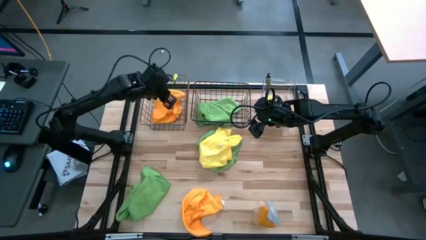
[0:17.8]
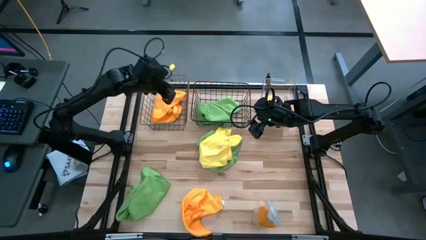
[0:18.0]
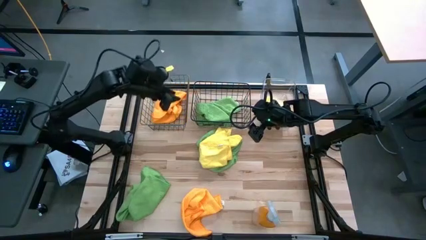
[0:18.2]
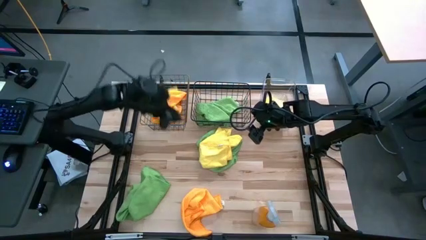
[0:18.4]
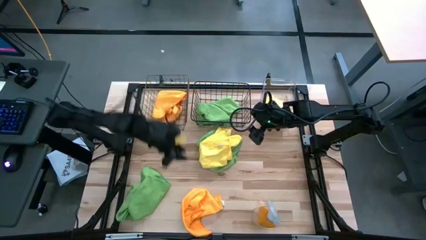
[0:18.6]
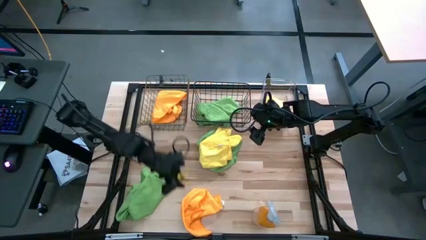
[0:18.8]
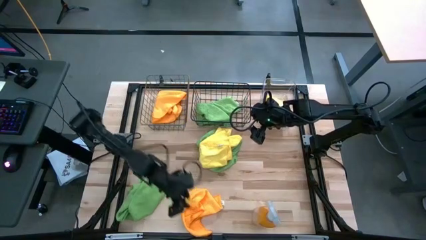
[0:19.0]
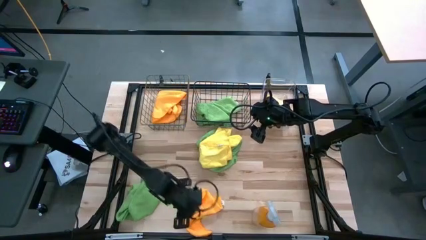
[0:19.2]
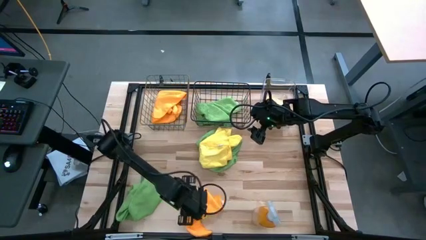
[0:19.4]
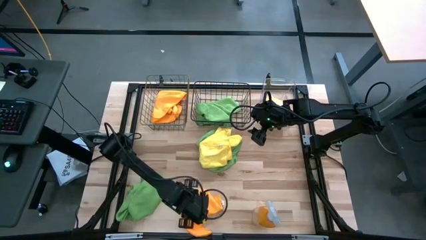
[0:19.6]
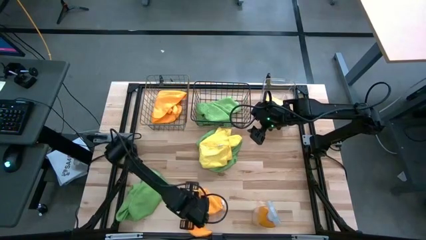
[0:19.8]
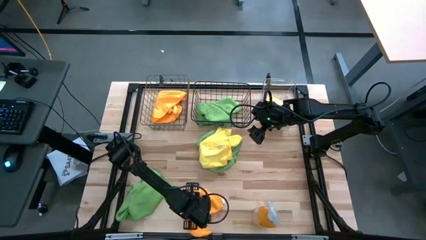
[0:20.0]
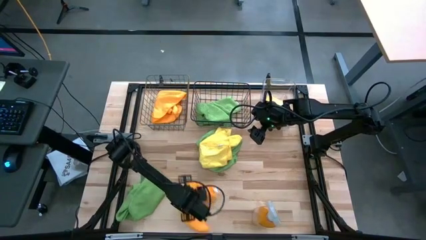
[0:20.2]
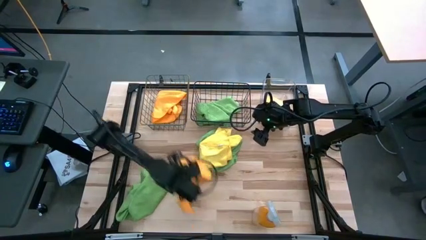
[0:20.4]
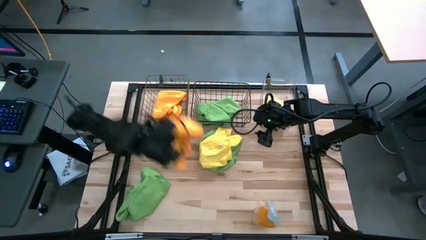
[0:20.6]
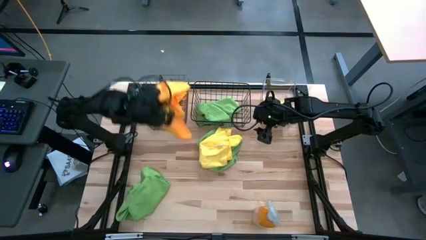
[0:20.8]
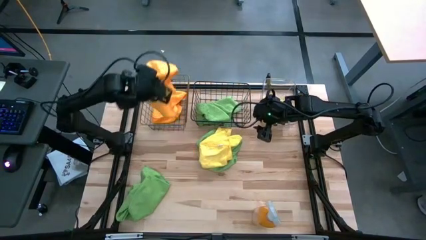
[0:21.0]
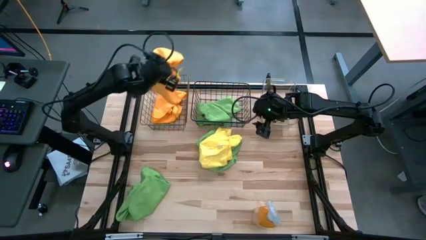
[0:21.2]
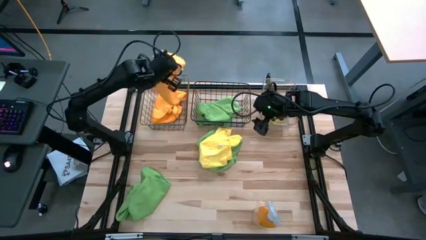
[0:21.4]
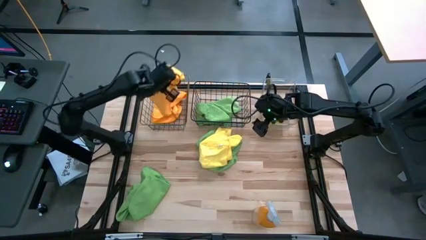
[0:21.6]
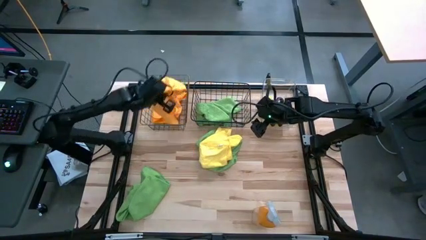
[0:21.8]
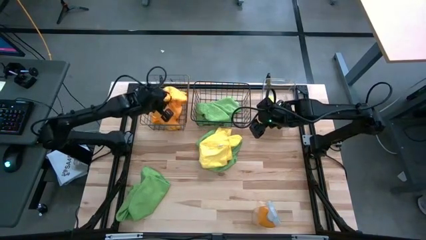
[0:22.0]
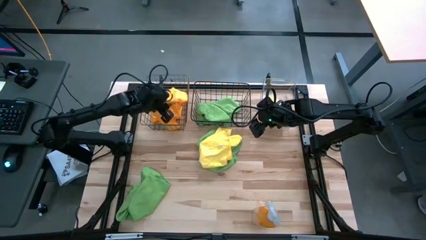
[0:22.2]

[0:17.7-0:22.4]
Task: Sort microfiber towel by color & place in baskets
Put the orange microfiber towel into the brown wire basket

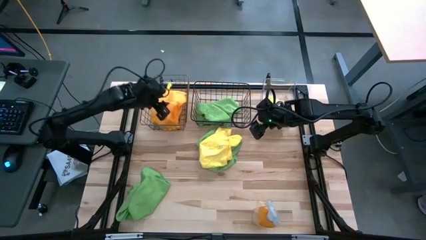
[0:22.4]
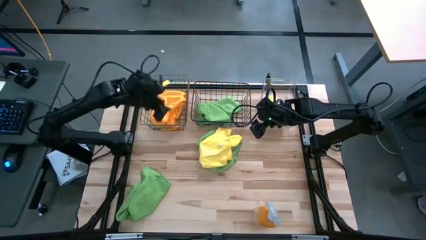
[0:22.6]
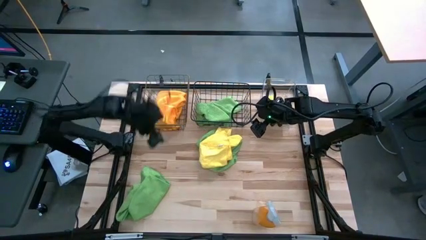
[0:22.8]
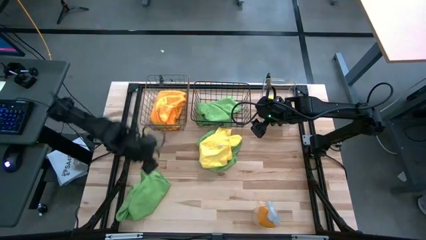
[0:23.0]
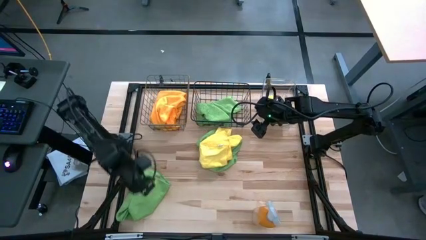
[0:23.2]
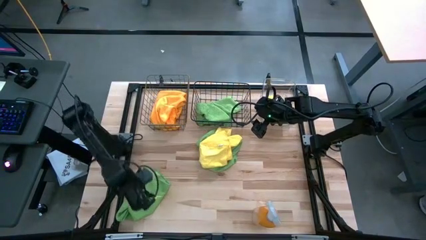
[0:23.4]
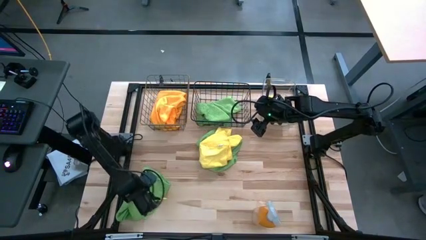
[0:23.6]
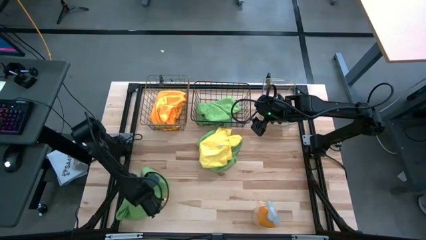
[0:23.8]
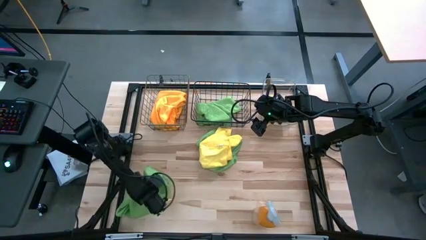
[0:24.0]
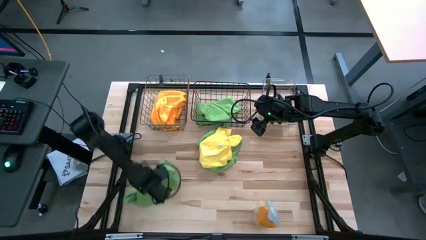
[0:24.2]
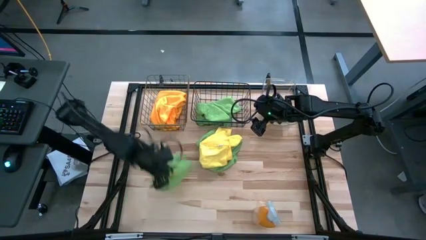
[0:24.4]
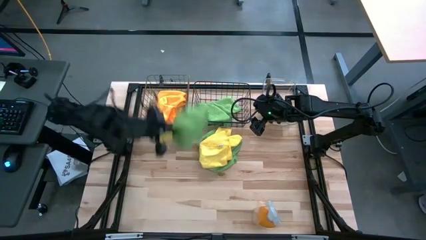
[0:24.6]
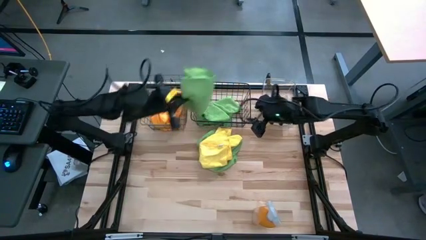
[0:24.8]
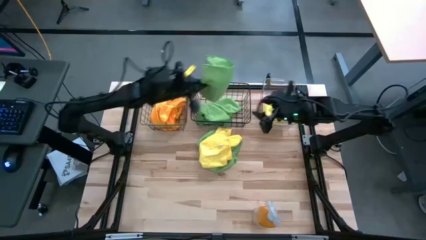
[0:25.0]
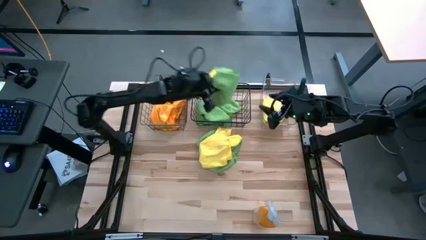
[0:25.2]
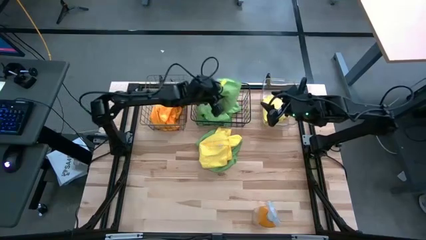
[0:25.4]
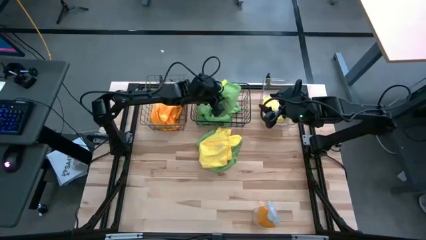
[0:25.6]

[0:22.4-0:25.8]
Put the bottom green microfiber towel into the black wire basket

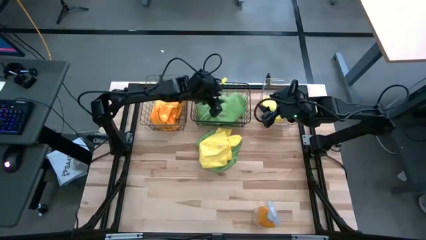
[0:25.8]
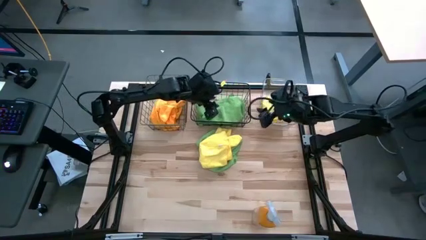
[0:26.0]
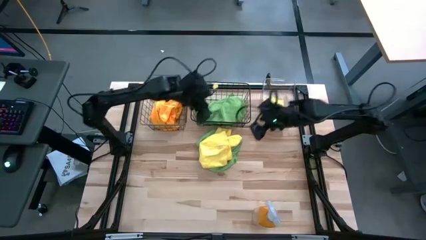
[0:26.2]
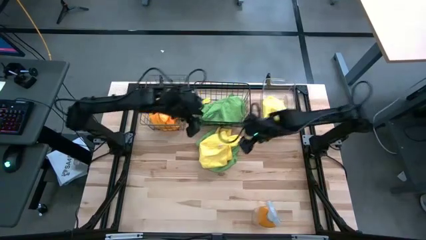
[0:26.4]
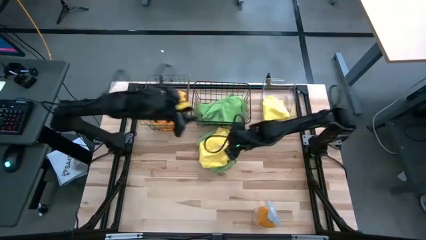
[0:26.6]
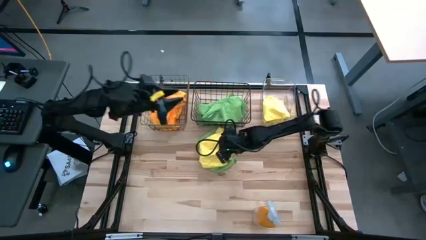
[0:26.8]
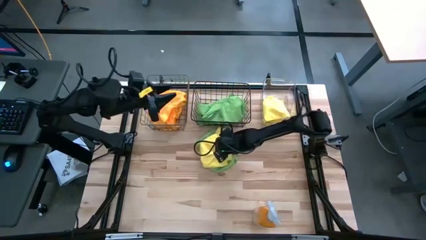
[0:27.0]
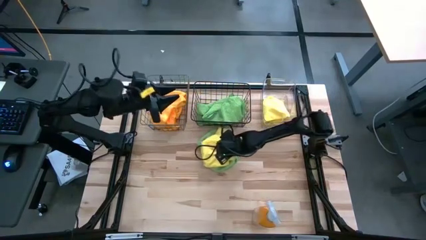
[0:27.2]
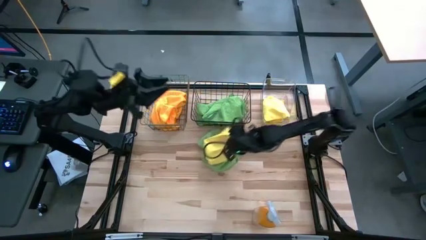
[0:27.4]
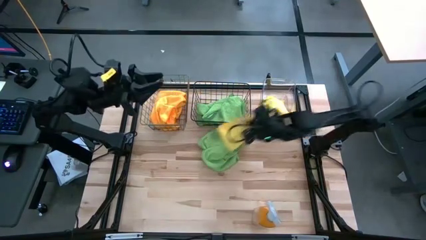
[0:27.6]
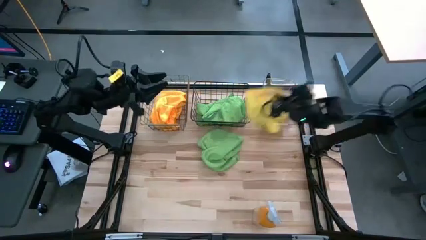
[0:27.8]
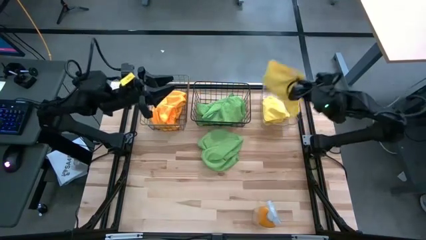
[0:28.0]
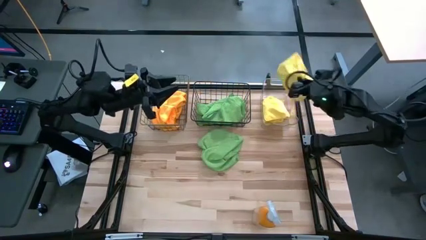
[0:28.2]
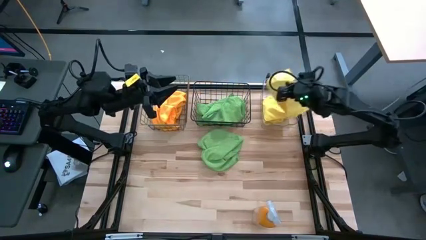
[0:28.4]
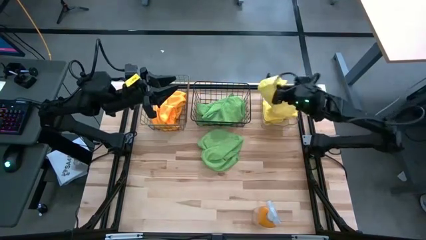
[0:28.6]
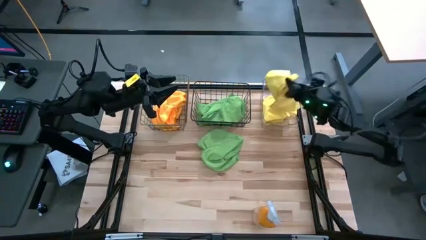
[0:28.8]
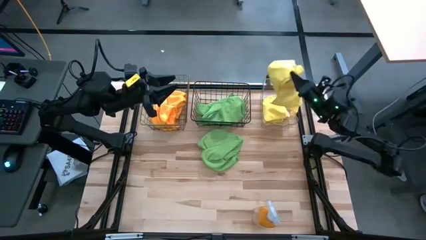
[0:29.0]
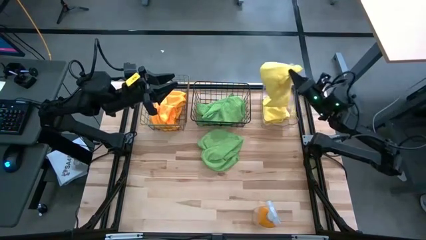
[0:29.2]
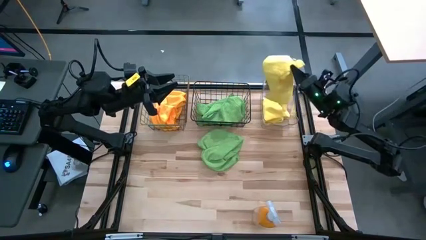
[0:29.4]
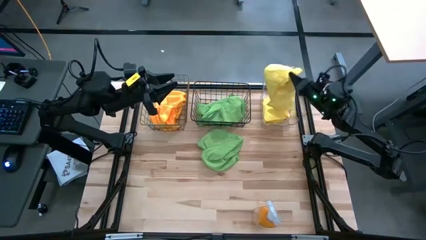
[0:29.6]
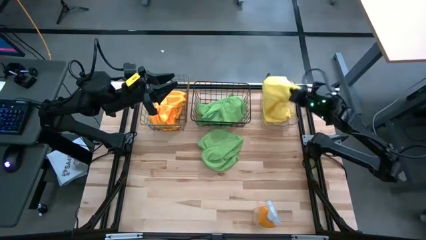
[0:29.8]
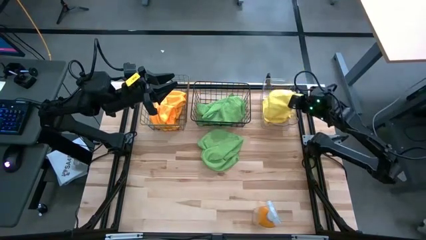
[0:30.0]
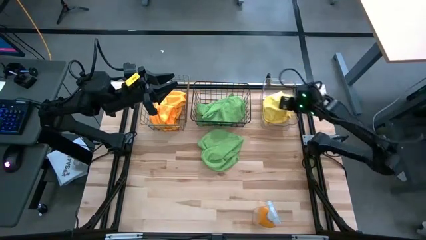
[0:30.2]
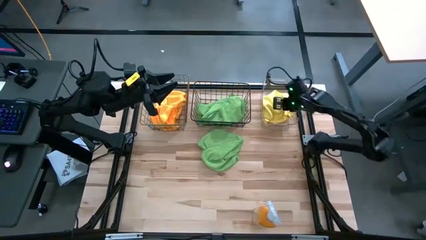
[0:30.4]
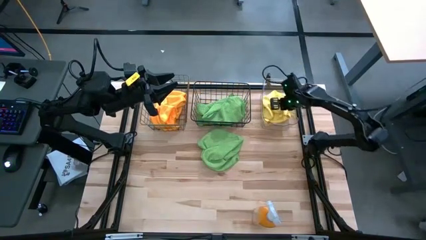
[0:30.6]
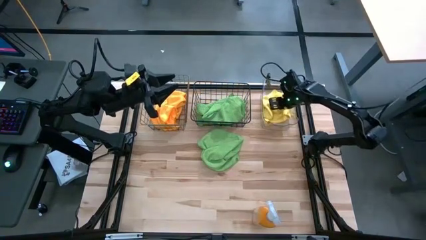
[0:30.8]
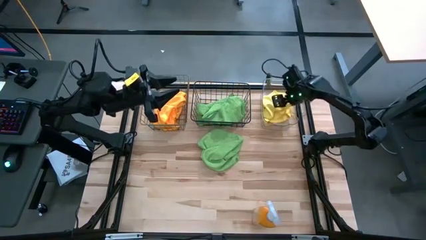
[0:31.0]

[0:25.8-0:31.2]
Put the yellow microfiber towel into the transparent bin

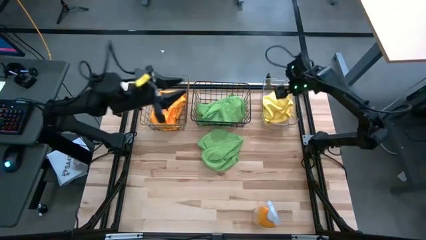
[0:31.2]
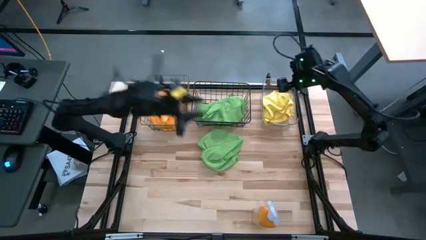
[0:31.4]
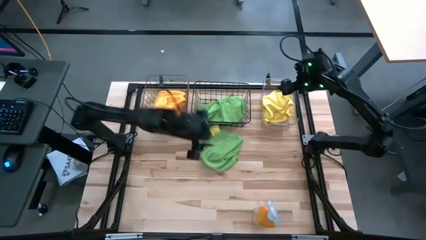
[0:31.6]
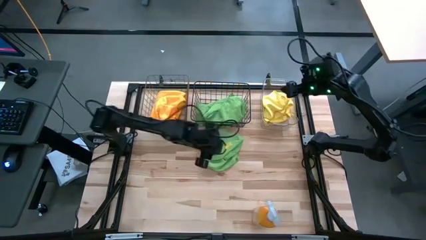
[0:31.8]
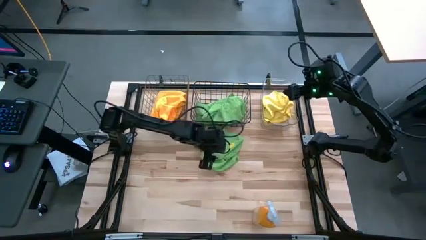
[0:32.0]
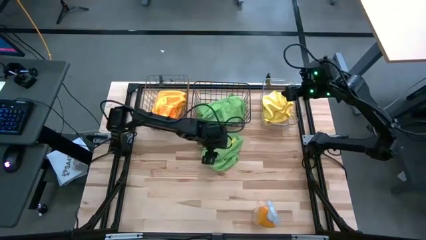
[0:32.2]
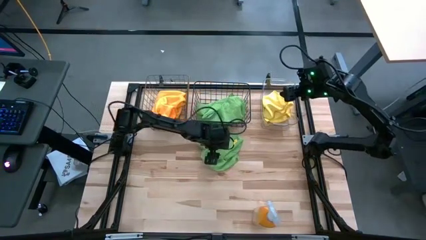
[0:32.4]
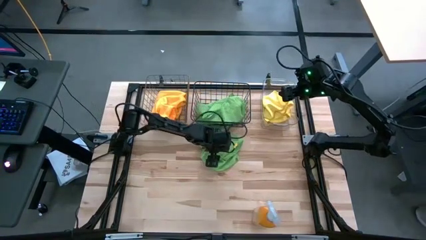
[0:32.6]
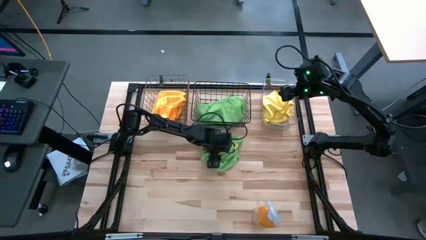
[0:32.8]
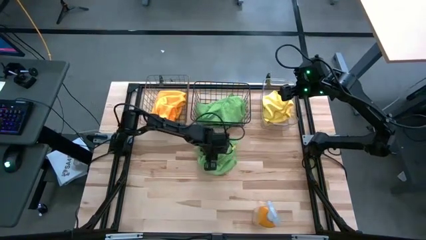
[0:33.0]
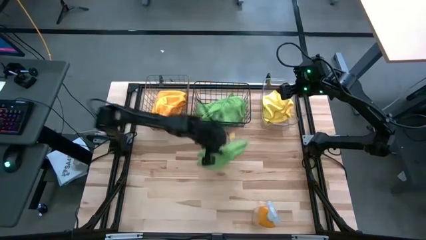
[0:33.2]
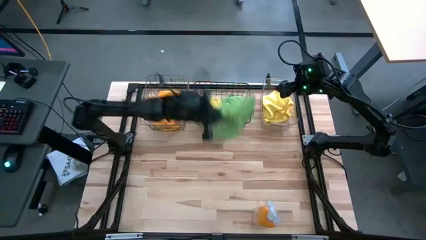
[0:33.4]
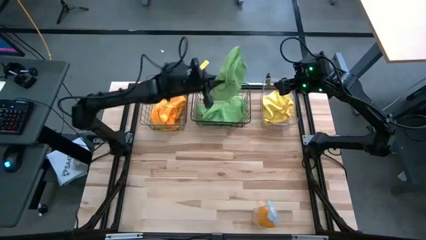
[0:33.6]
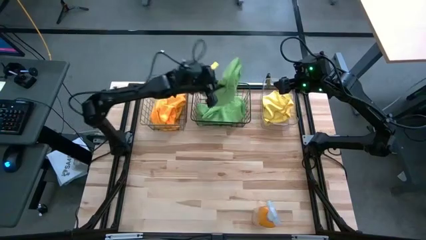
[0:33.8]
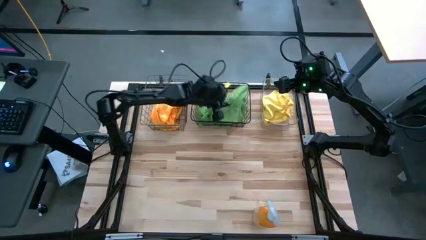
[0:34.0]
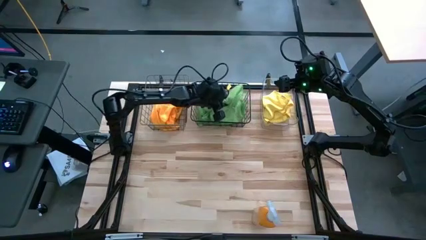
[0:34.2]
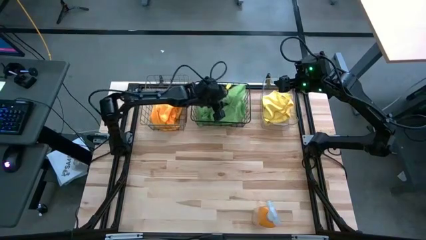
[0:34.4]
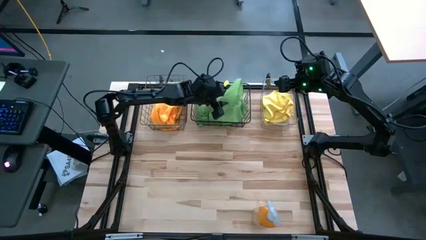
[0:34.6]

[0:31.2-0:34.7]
Put the green microfiber towel into the black wire basket
